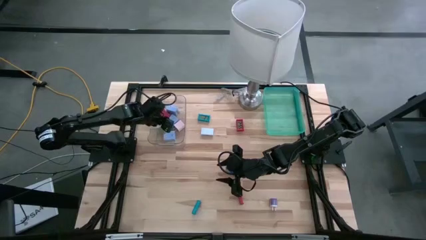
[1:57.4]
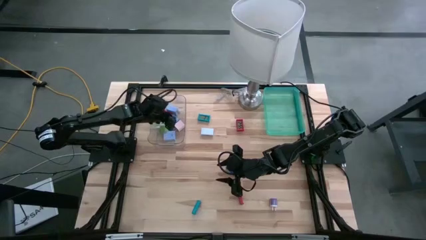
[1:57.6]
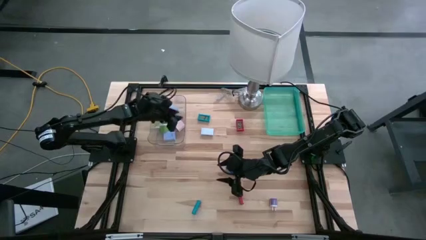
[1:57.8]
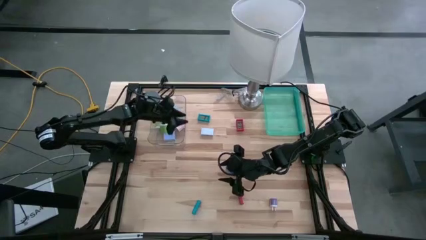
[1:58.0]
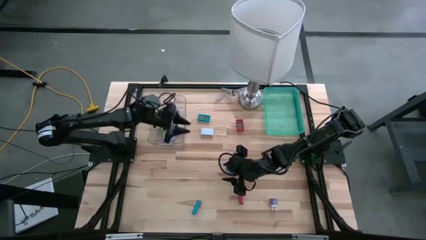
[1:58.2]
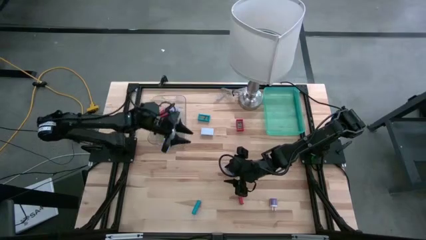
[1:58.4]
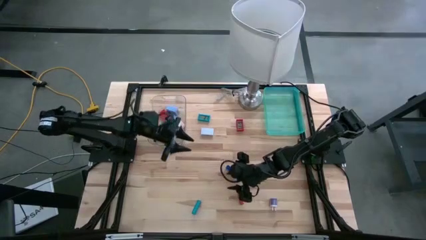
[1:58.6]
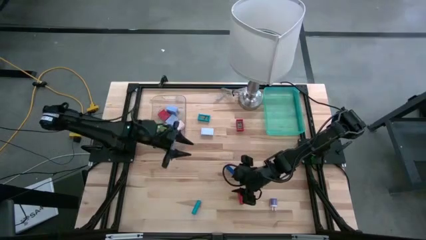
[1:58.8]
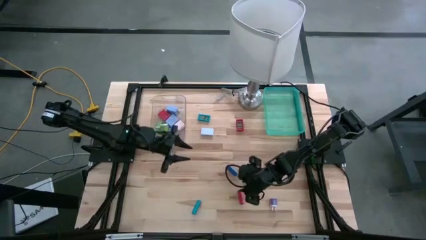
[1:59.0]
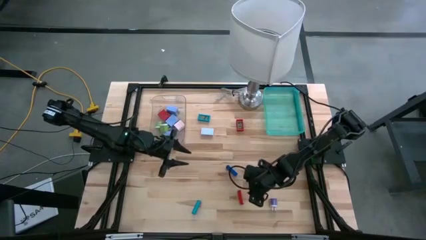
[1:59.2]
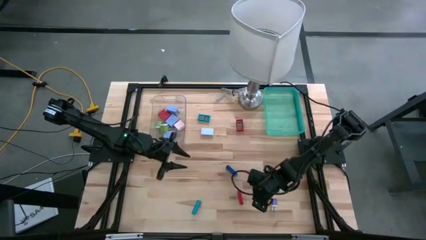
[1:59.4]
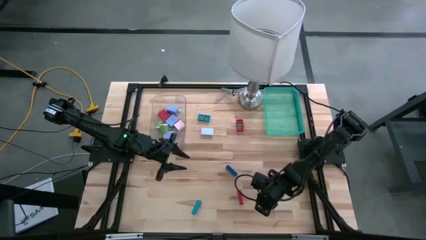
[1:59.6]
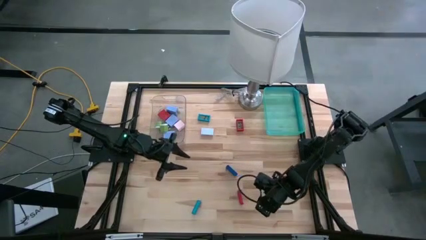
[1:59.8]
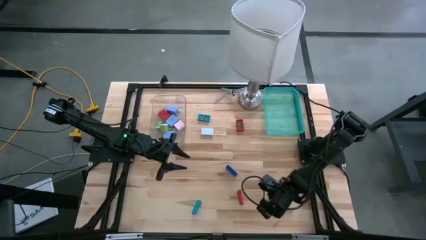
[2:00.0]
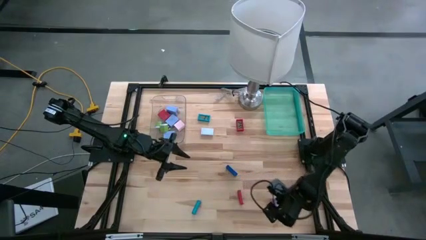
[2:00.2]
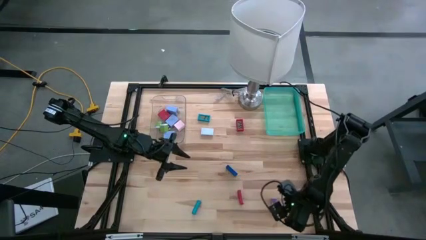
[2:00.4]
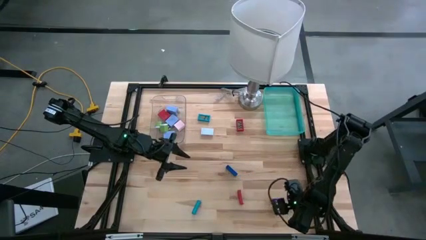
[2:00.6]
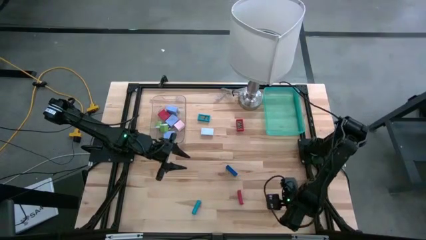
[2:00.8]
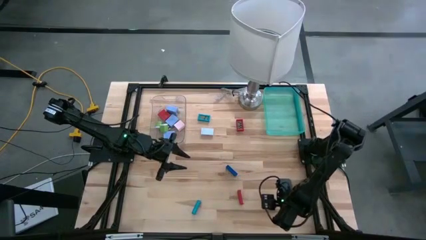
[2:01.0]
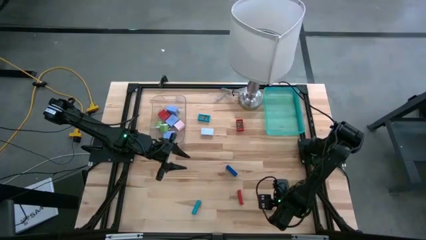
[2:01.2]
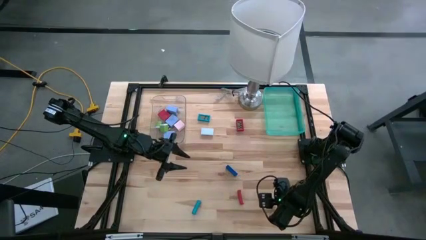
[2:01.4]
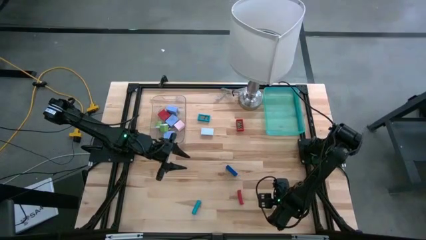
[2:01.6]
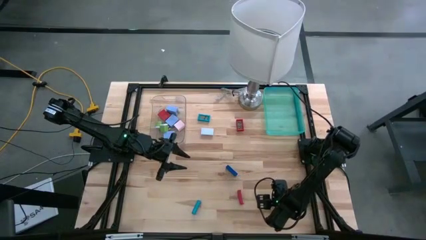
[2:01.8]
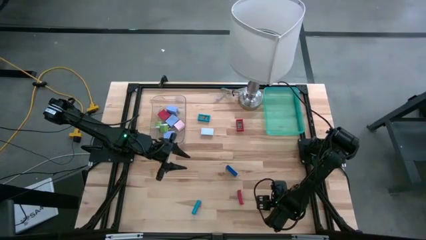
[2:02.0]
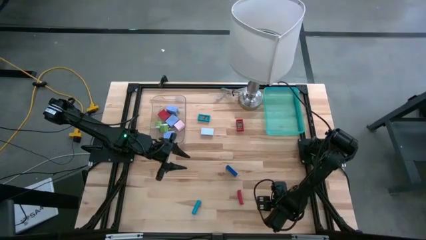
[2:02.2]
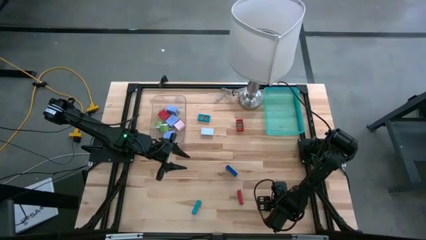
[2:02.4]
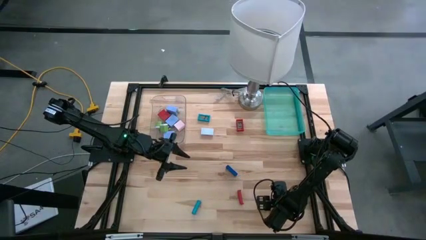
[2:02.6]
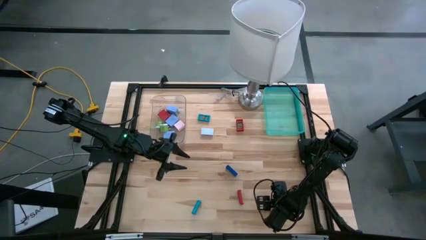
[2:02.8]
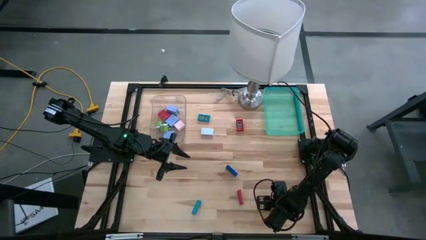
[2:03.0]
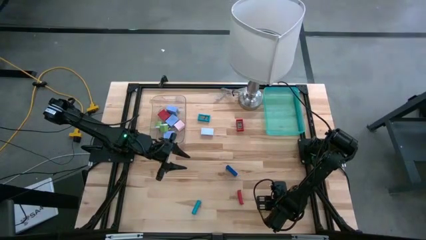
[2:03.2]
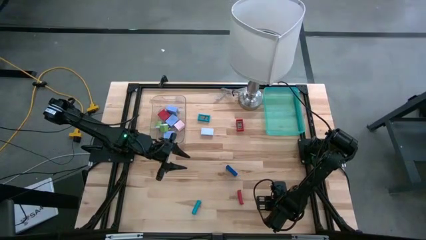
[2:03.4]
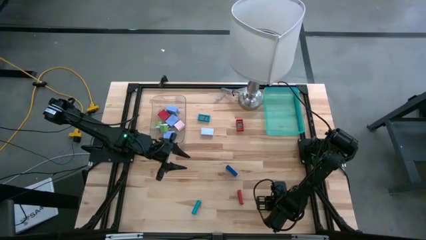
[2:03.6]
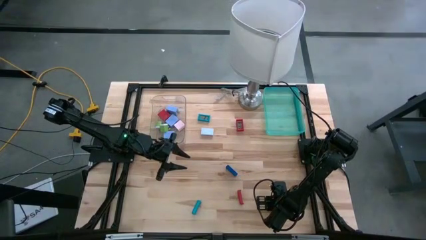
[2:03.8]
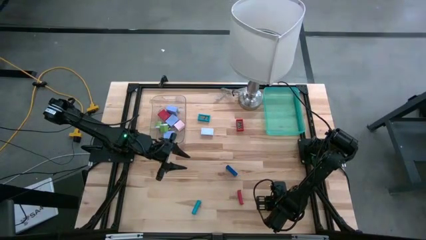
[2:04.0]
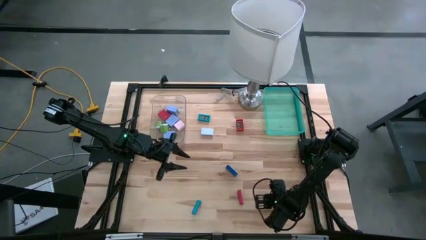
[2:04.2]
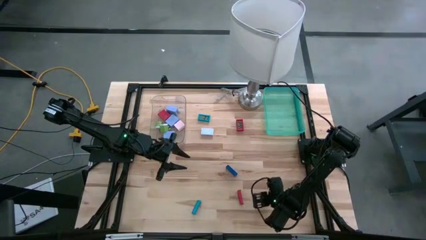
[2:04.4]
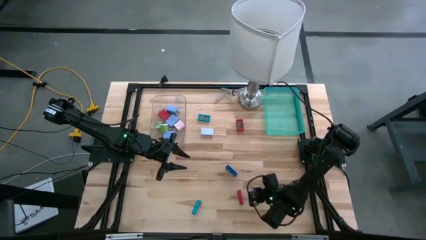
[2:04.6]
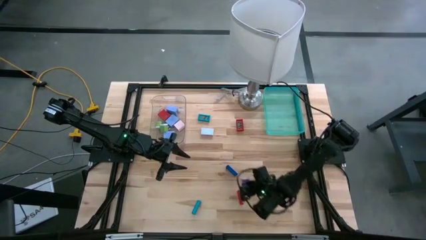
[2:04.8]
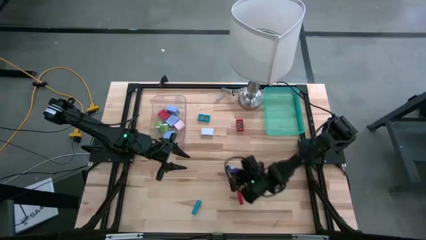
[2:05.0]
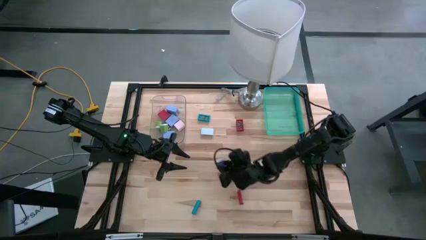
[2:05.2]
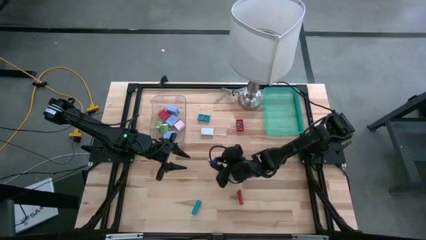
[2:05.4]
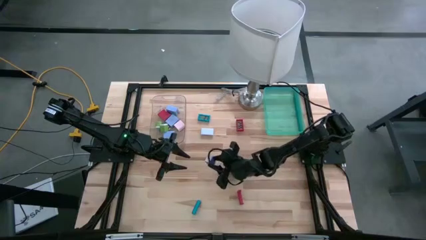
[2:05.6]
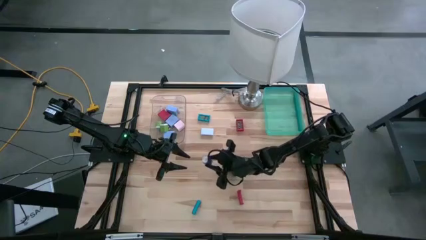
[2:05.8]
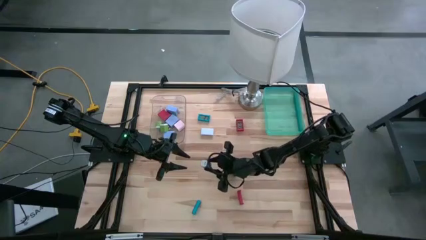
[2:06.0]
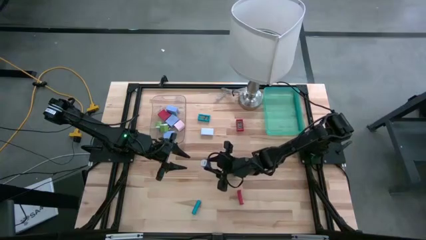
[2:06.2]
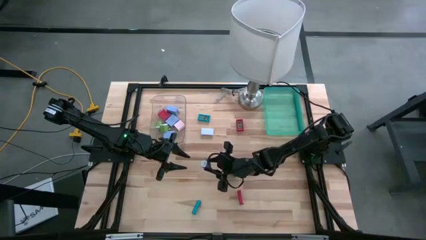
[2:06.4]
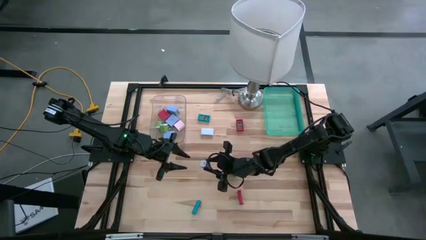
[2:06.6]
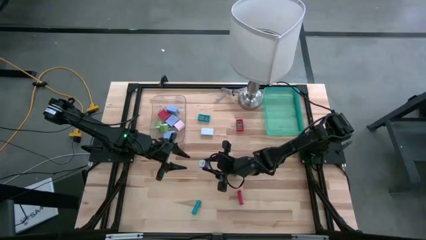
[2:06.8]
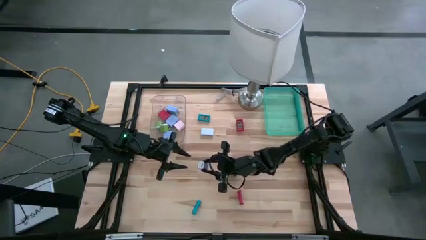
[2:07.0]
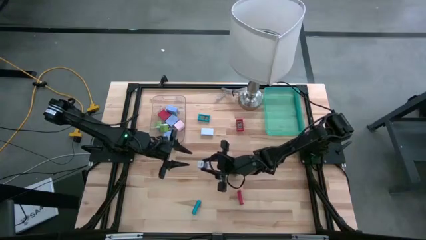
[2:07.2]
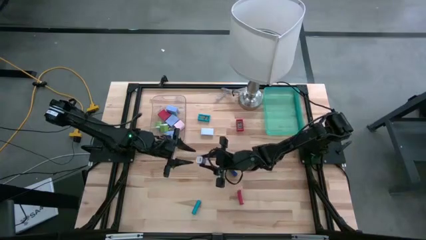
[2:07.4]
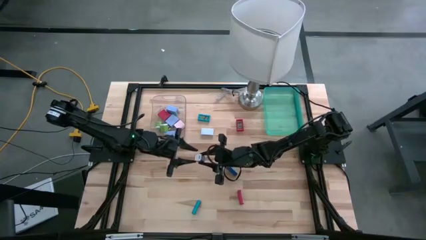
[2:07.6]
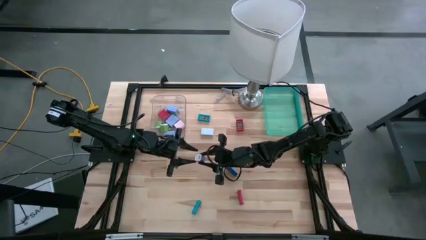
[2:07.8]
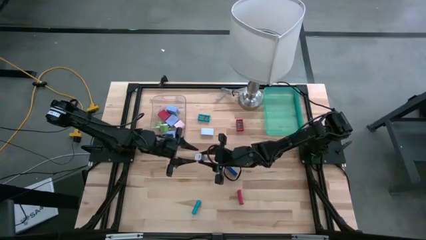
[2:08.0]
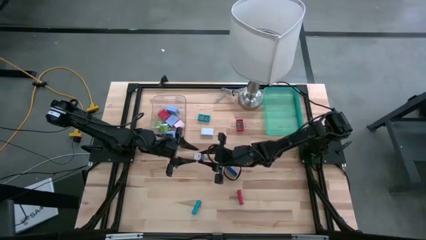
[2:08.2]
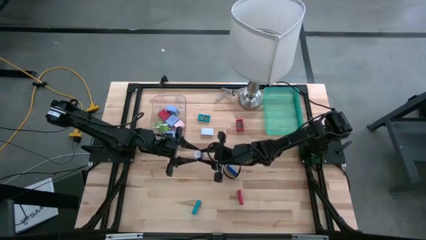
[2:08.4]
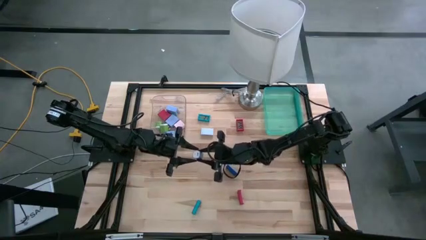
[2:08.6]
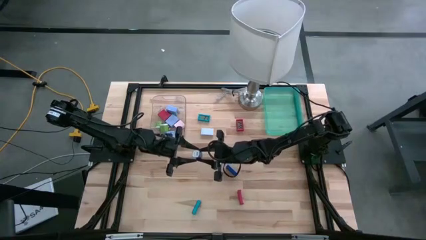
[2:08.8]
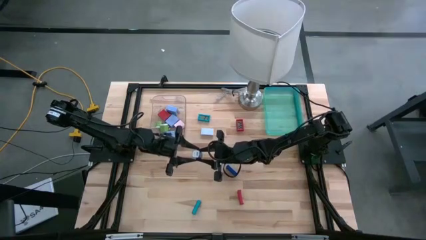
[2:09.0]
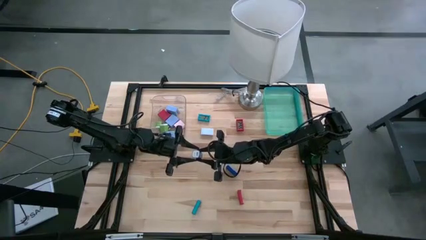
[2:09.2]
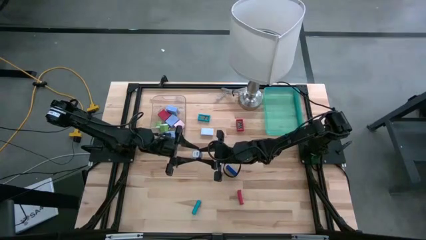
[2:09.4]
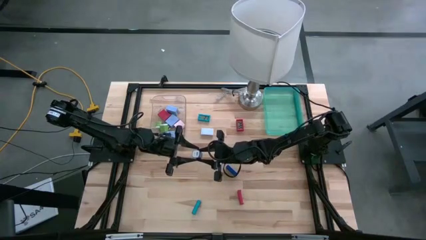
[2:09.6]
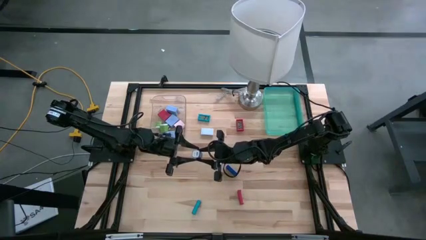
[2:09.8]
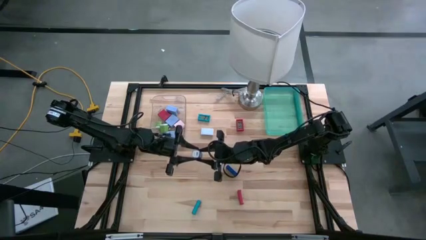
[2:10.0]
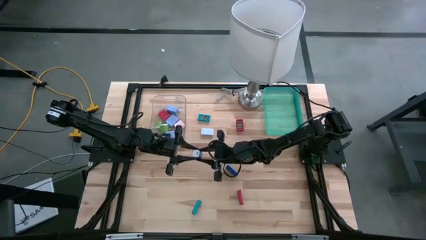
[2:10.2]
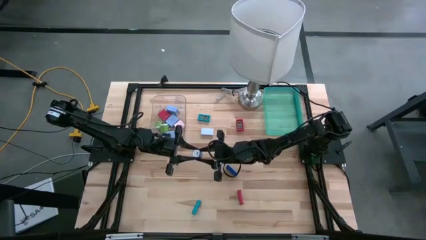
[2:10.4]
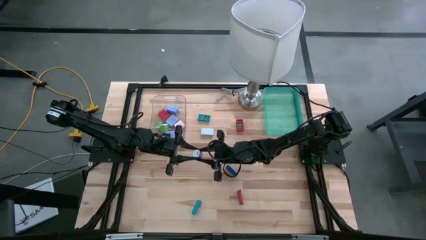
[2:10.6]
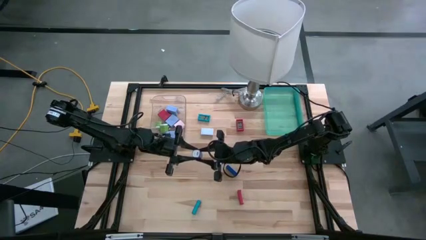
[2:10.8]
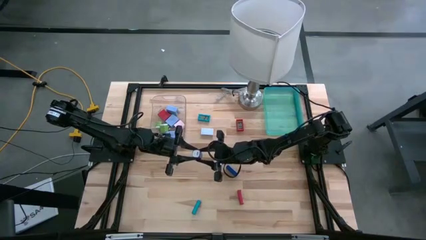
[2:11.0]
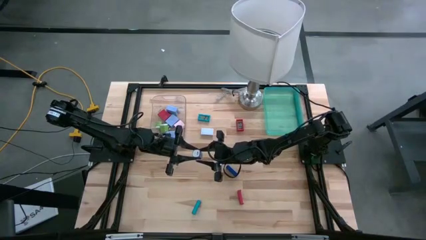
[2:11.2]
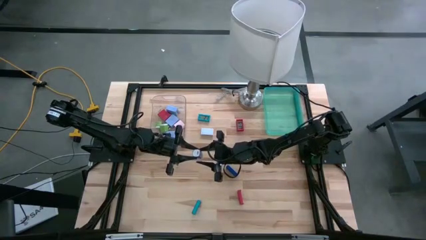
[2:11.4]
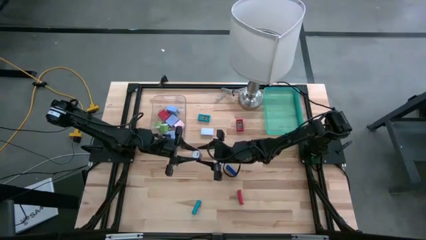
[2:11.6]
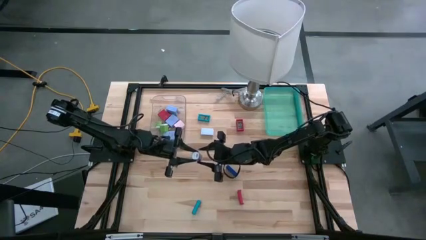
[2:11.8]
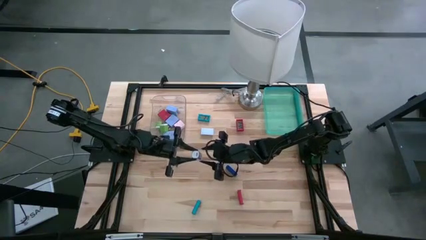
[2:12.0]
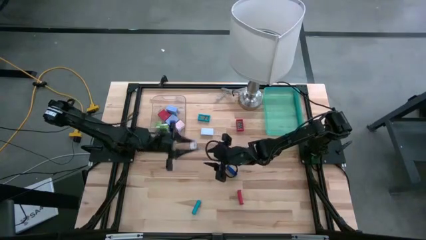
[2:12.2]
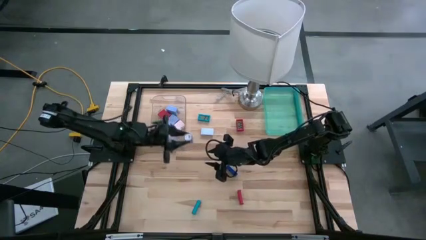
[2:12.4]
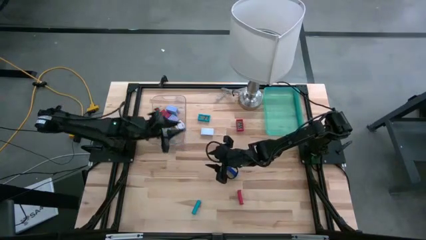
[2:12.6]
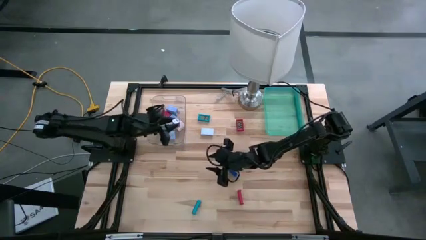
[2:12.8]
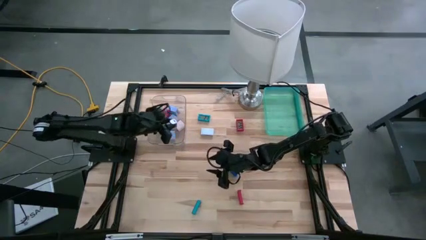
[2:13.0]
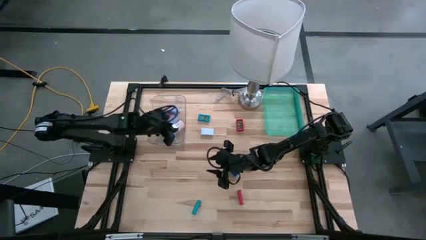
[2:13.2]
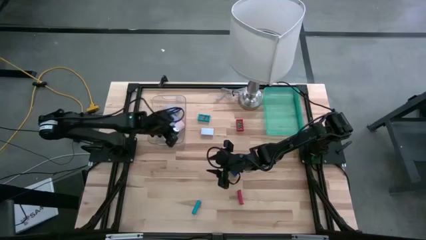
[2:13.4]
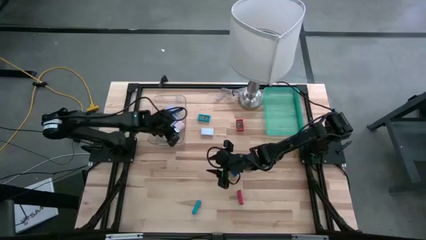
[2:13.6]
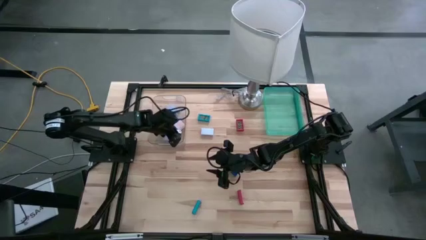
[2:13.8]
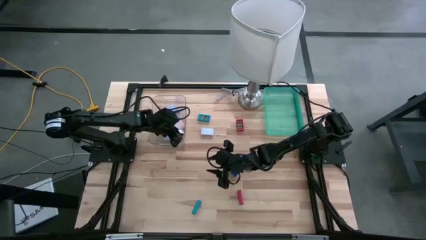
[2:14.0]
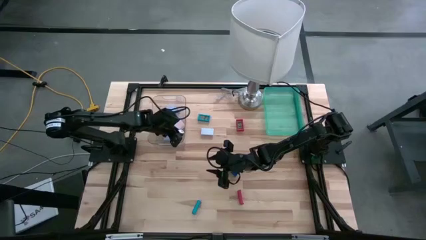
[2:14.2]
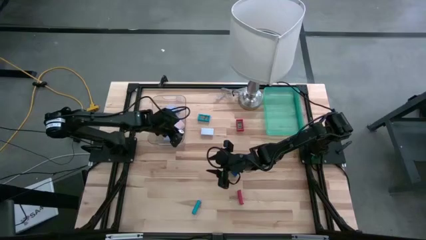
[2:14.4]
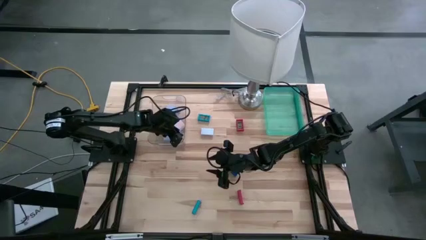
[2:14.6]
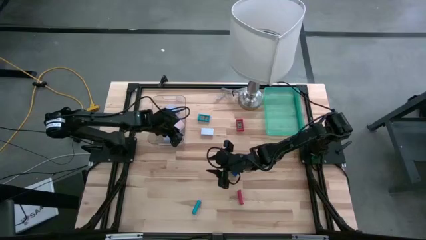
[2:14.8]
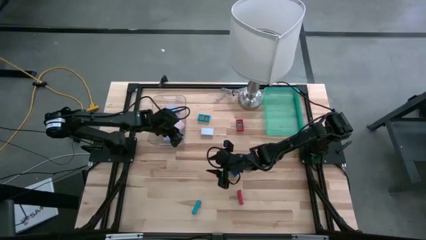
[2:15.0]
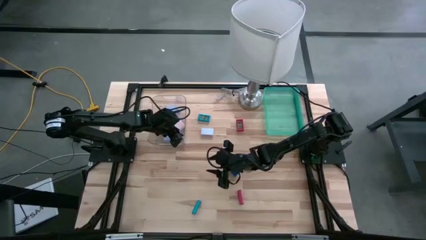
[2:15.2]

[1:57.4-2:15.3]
Task: Pick & Place Office items
Put the purple charger adapter into the transparent bin
